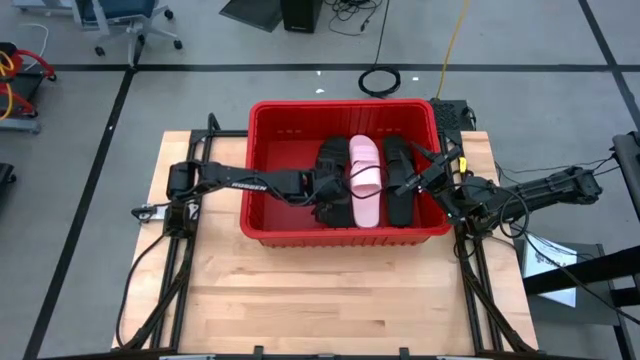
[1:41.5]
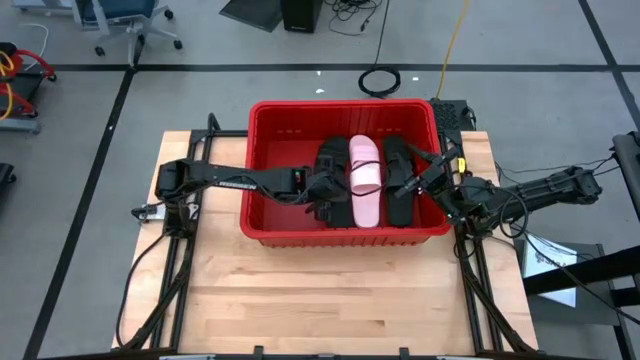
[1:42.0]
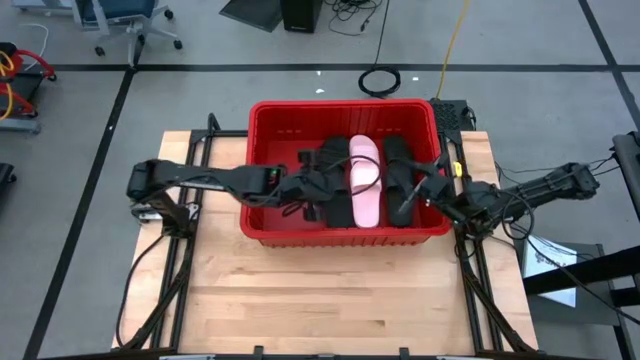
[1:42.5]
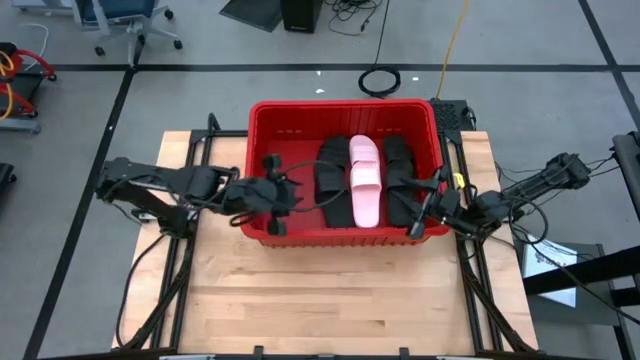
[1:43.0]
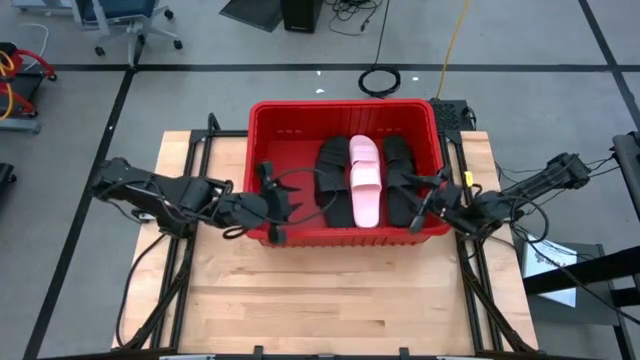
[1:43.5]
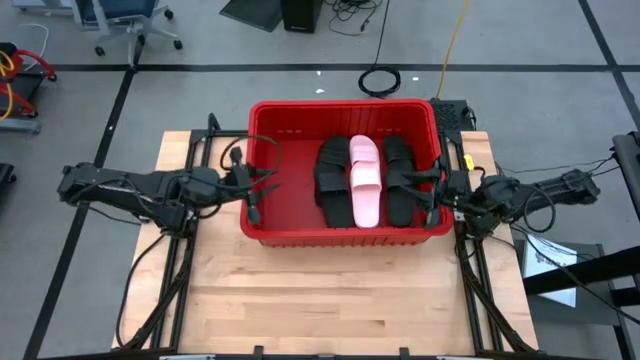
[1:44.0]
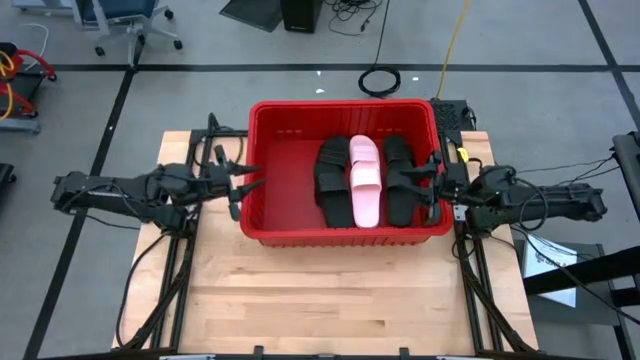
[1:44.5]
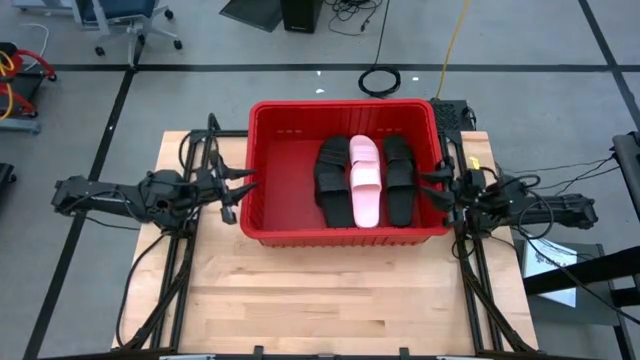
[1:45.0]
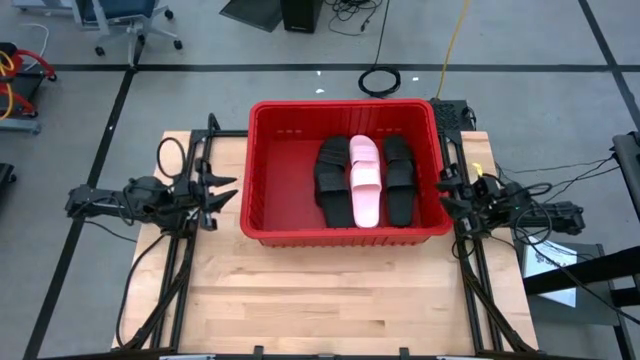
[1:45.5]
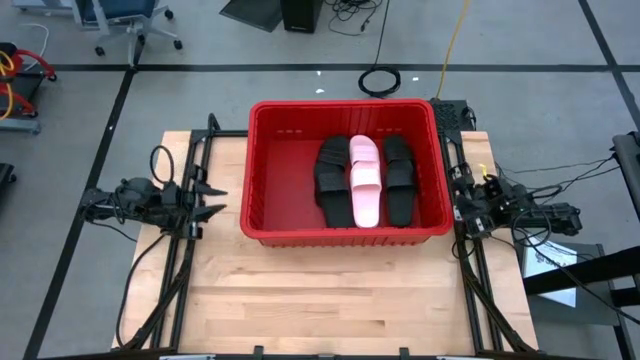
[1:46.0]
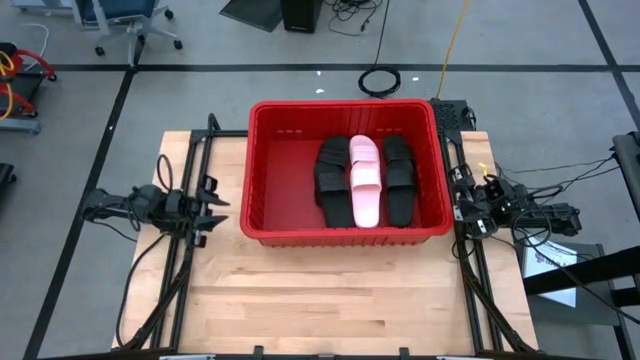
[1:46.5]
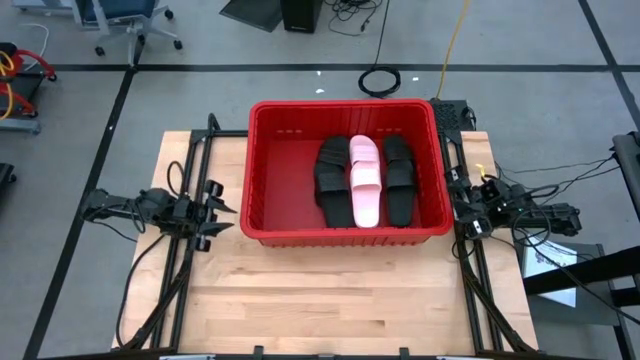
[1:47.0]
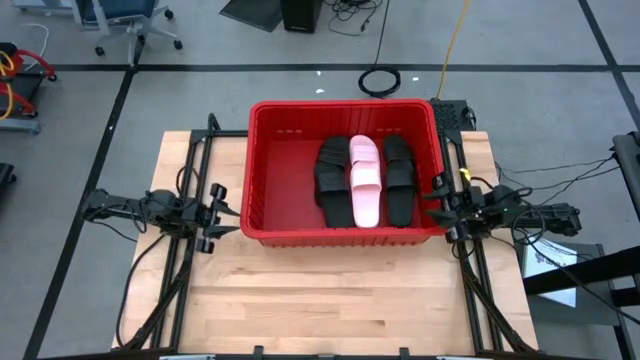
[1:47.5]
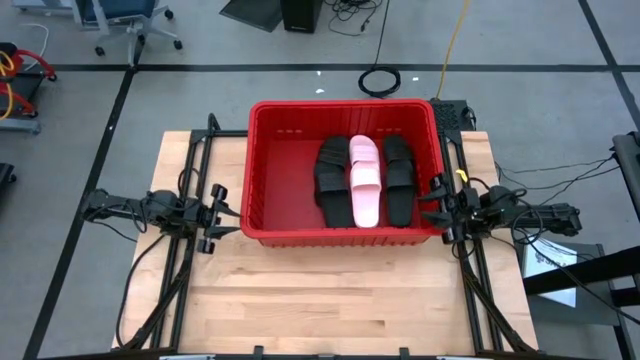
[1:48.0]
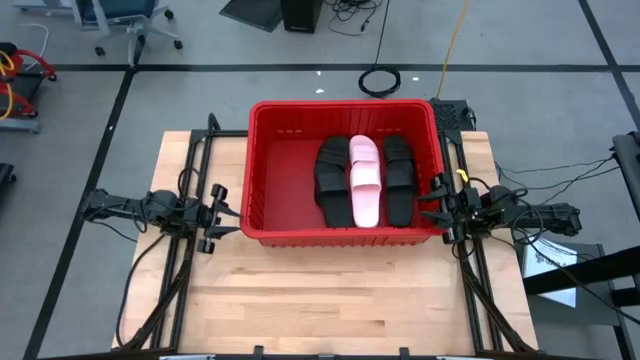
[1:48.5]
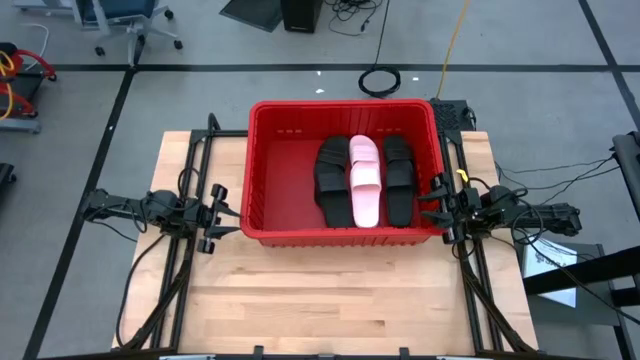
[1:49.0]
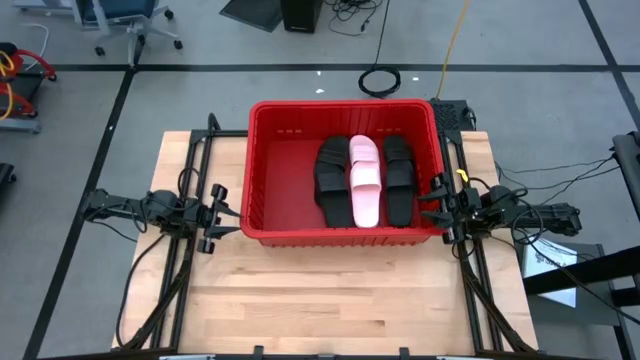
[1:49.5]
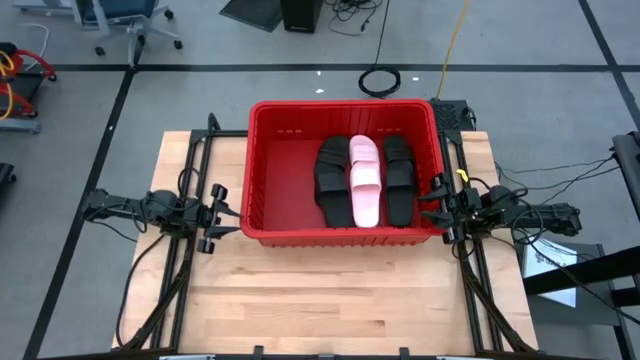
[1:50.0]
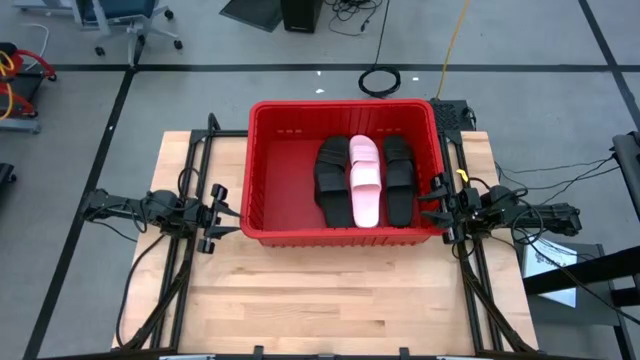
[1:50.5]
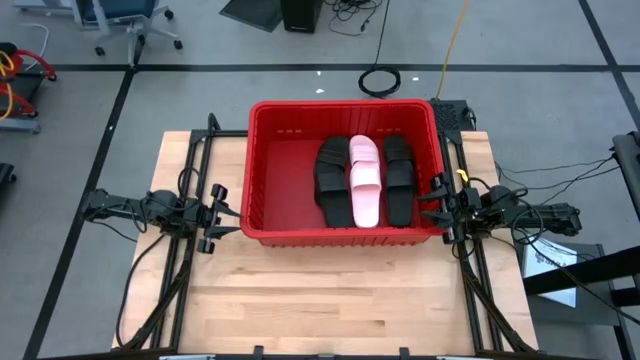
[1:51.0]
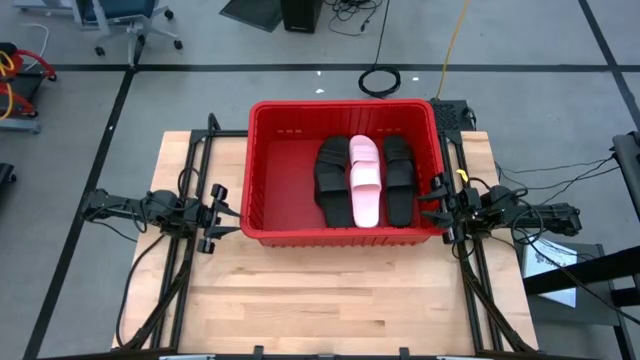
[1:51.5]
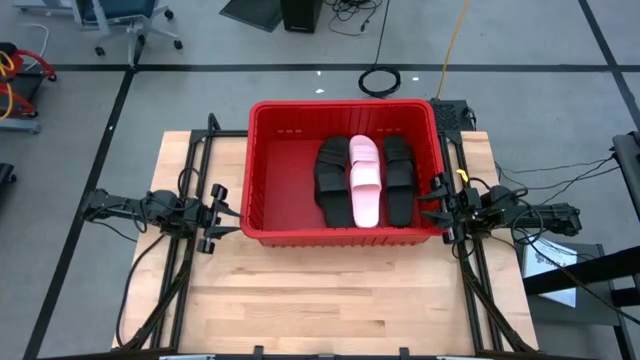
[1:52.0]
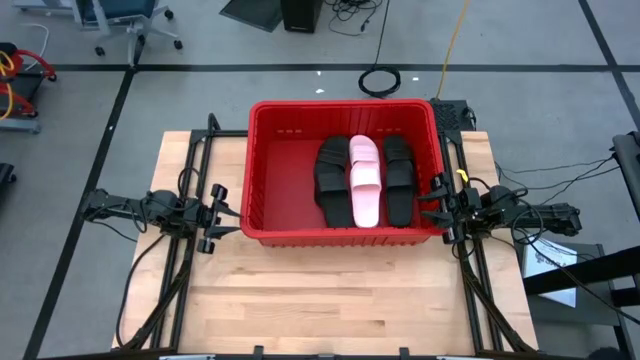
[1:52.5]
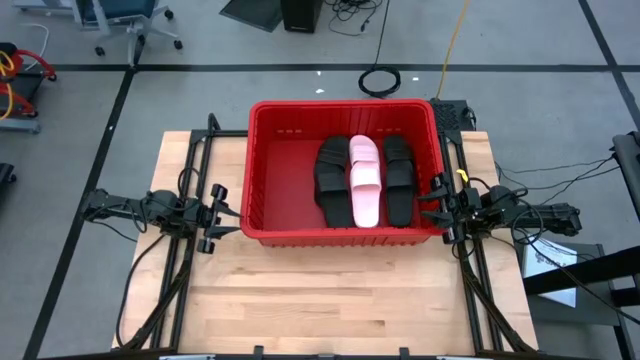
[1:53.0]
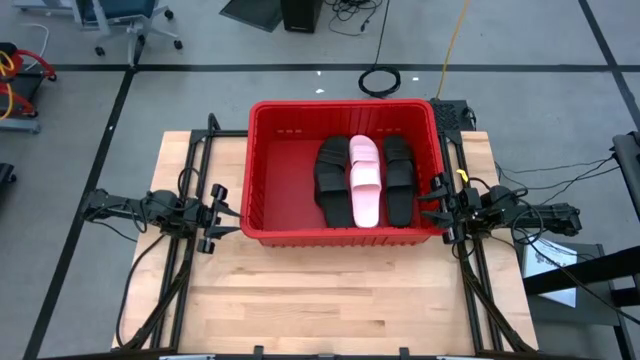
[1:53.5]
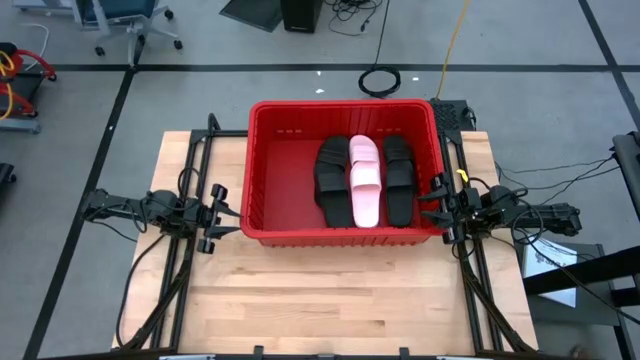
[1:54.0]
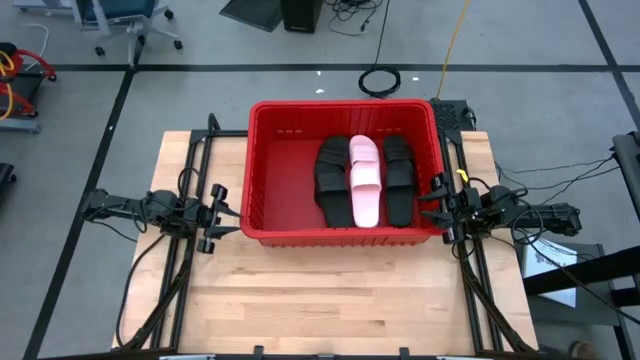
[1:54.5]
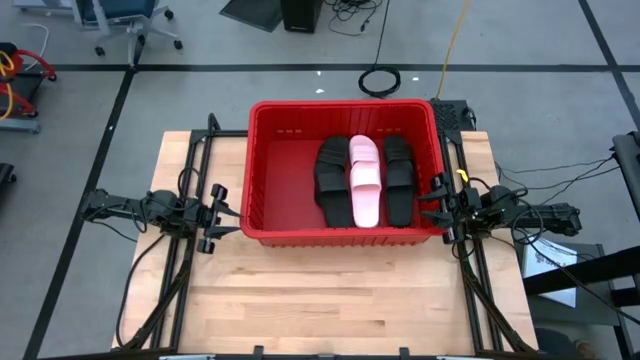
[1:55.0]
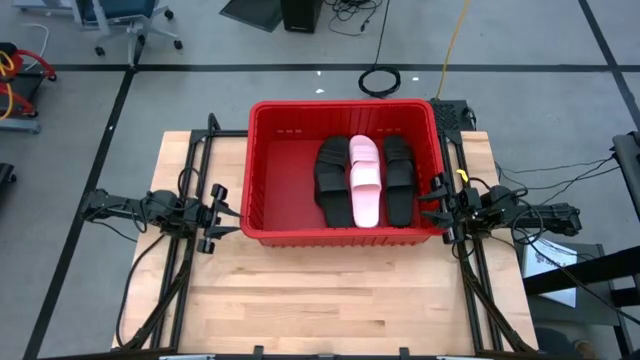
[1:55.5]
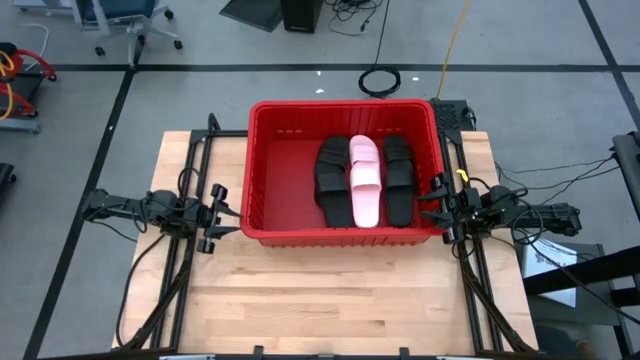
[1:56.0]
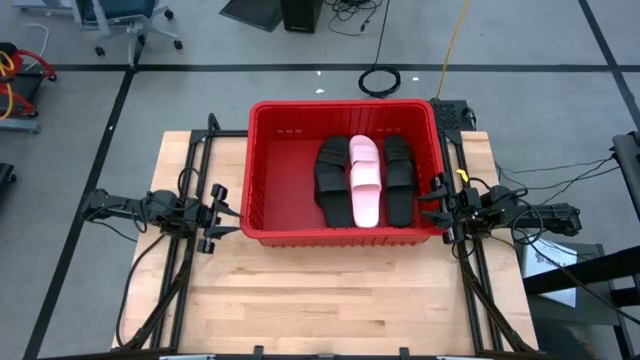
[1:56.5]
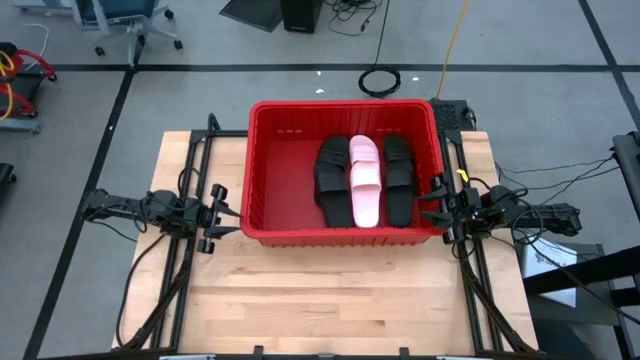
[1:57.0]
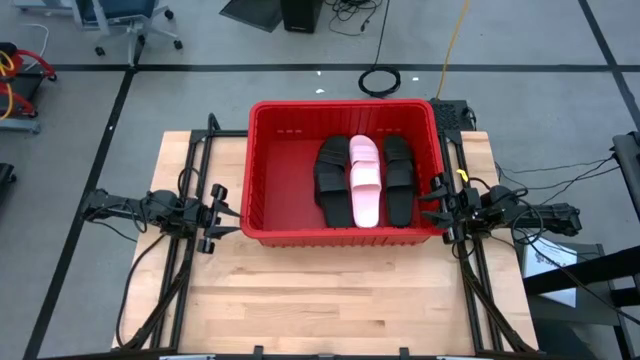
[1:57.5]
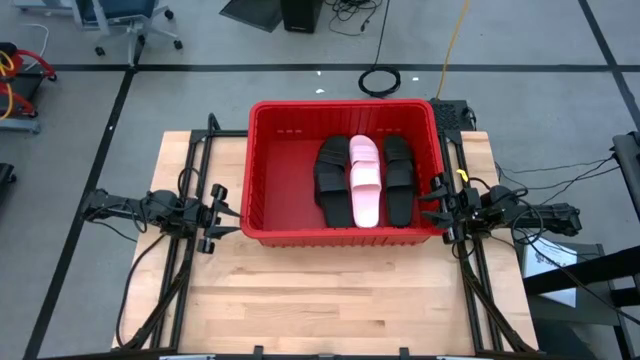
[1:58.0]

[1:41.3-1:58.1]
Task: Pick and place slides into bin
Return to Home Position

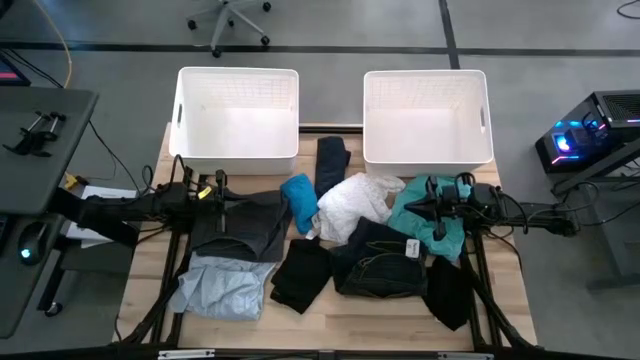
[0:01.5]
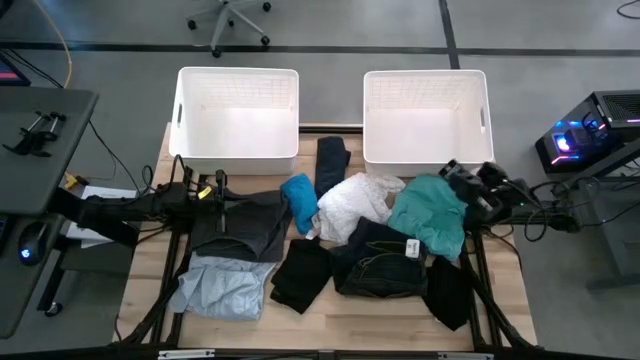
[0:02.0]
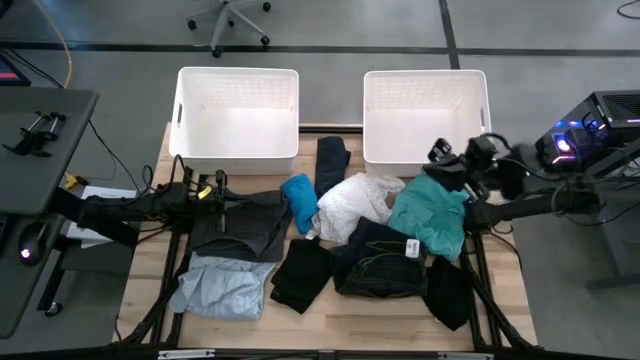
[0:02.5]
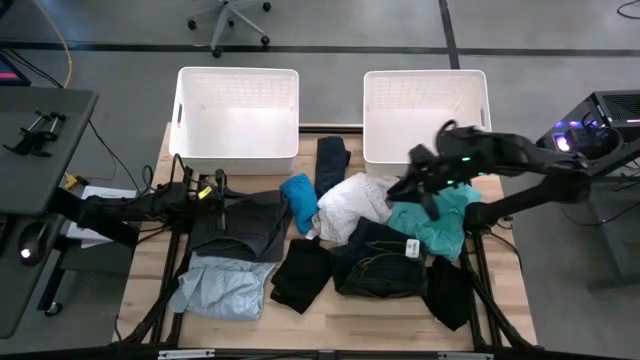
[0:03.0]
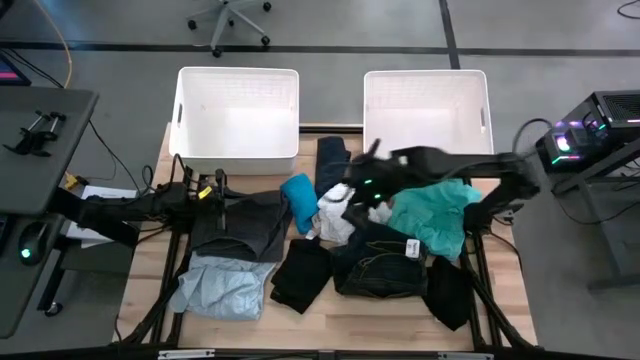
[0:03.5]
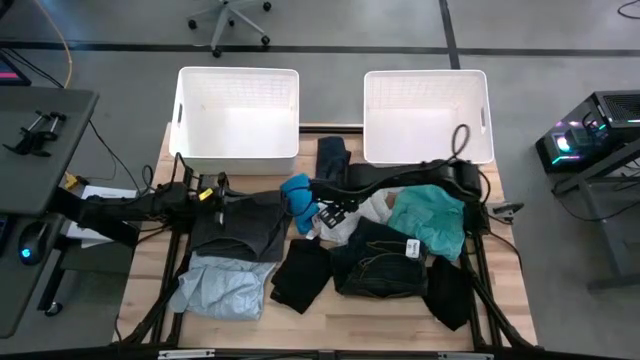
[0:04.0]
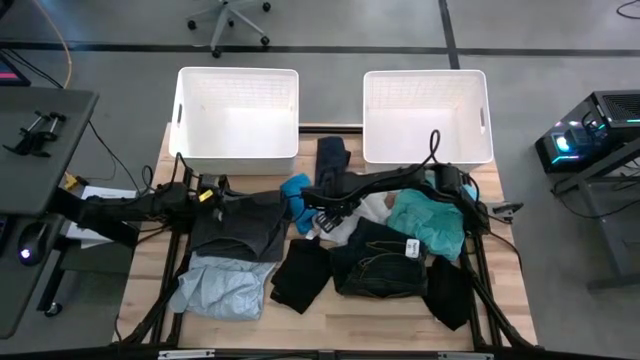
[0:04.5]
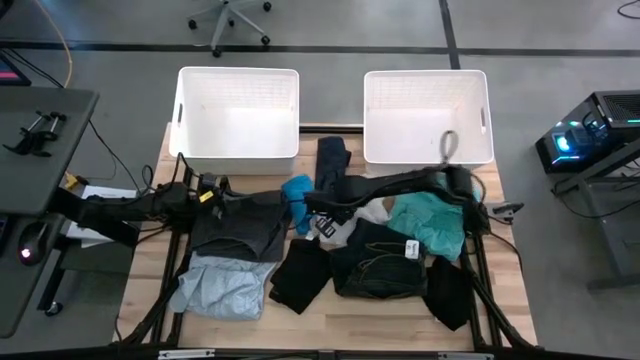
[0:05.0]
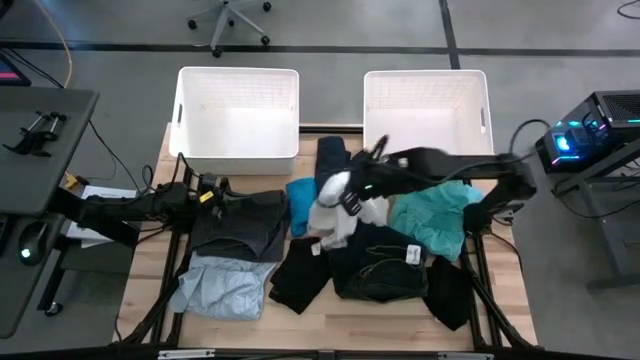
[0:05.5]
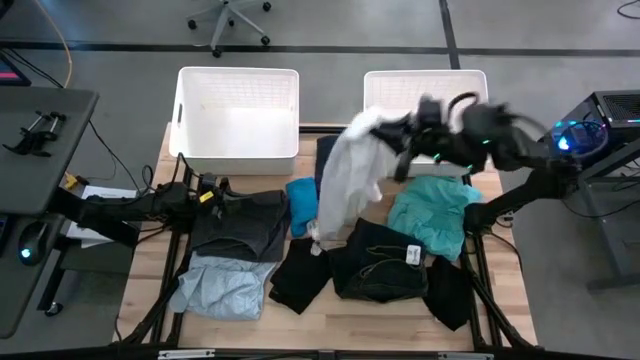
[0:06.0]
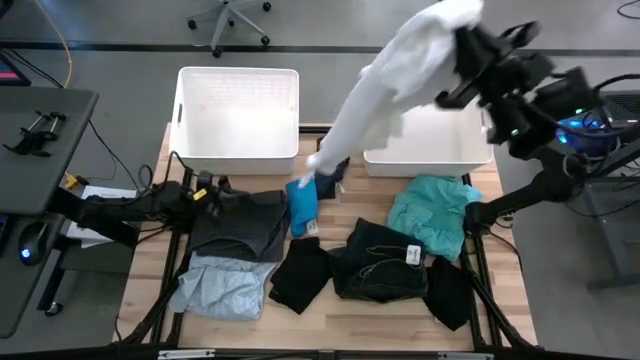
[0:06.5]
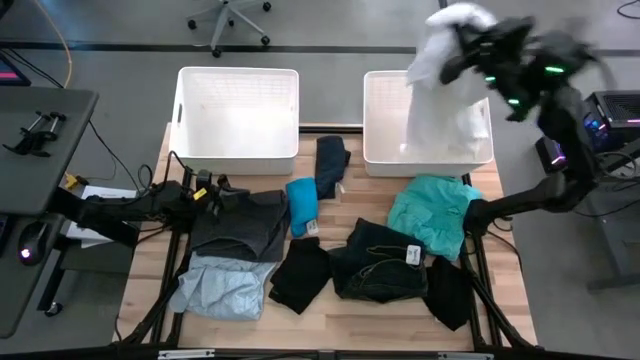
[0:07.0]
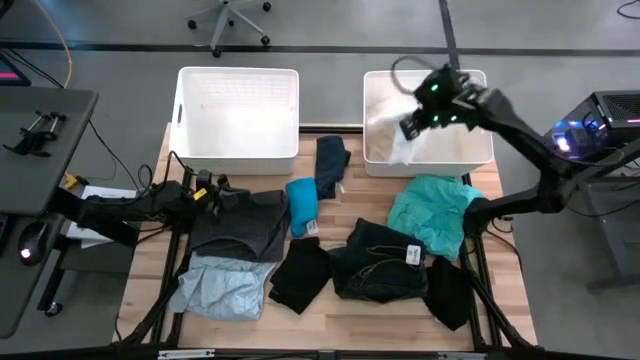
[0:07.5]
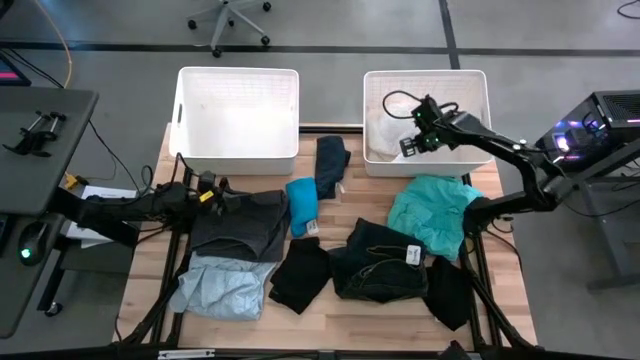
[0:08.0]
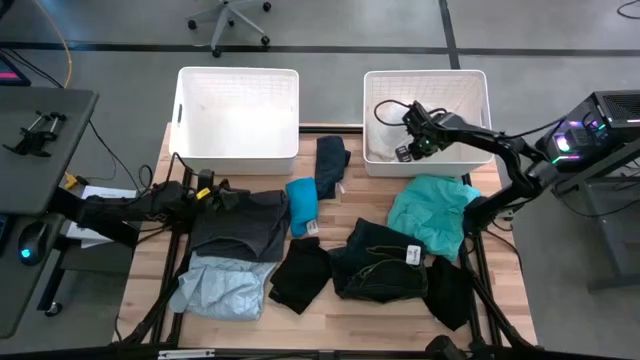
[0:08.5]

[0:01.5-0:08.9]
Task: Sort clothes
Put the white dress into the right white laundry organizer
